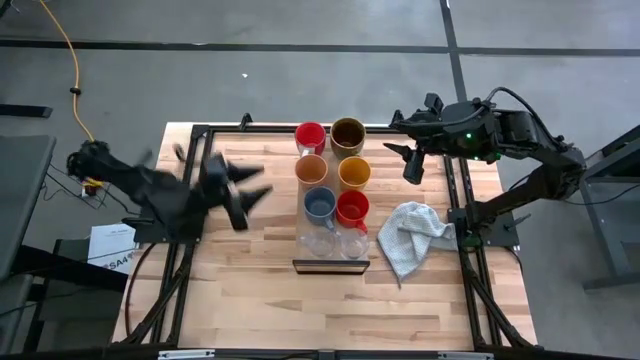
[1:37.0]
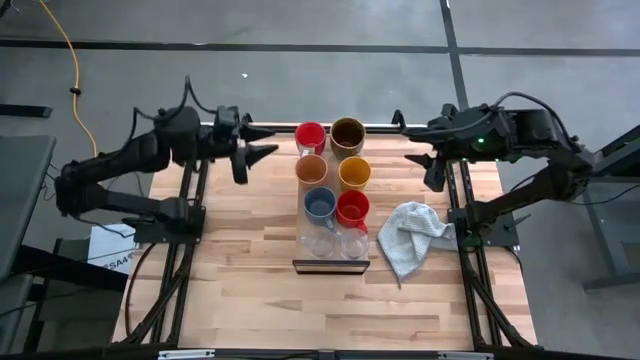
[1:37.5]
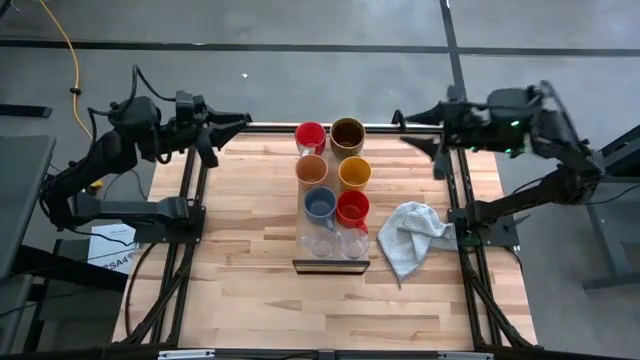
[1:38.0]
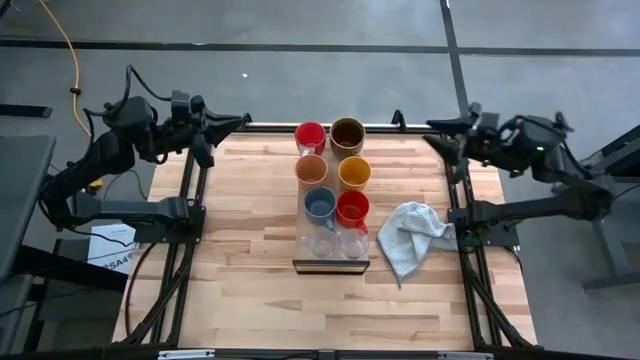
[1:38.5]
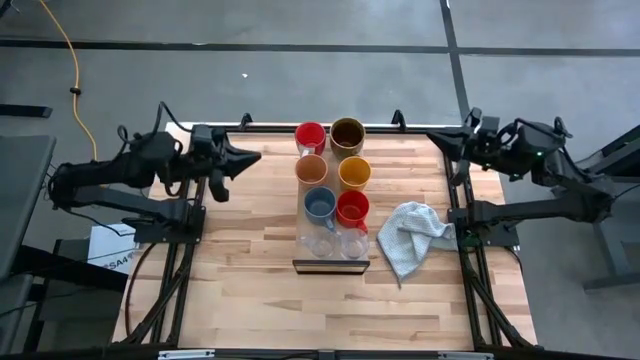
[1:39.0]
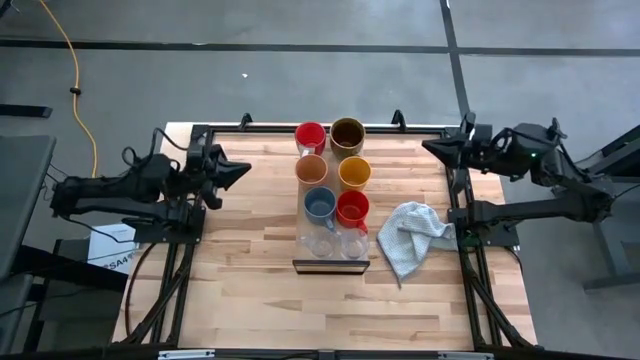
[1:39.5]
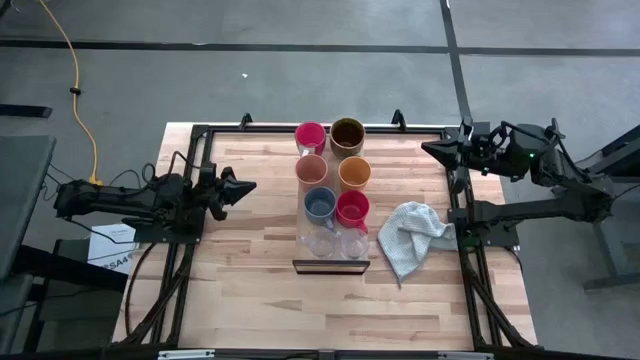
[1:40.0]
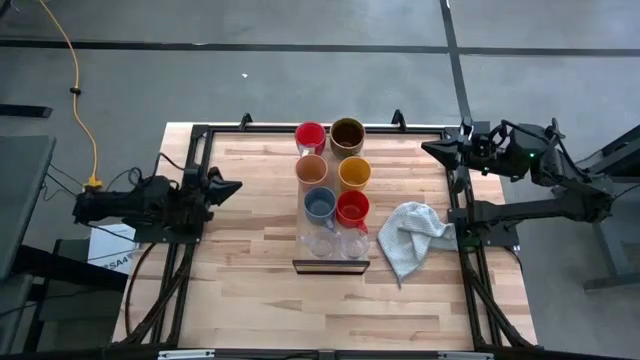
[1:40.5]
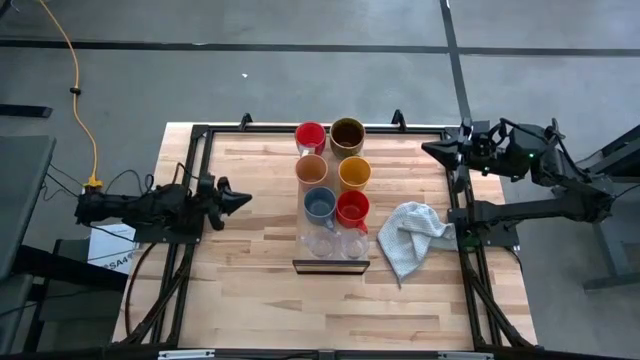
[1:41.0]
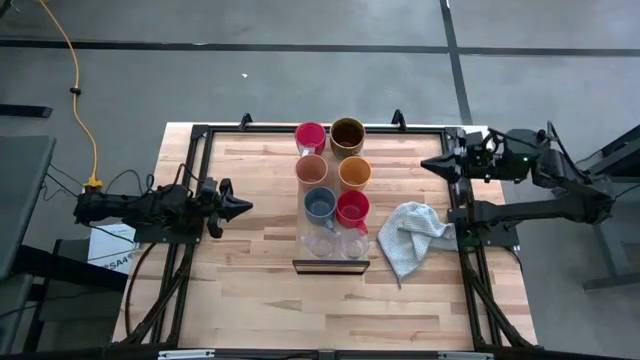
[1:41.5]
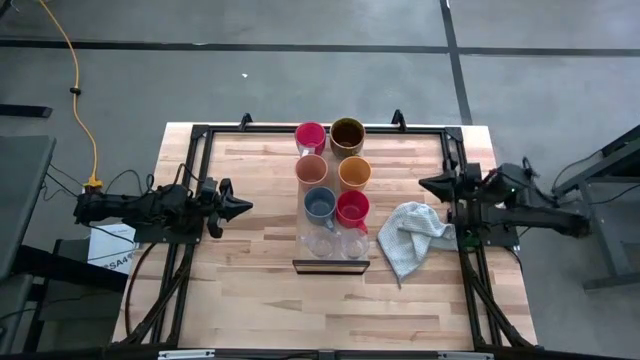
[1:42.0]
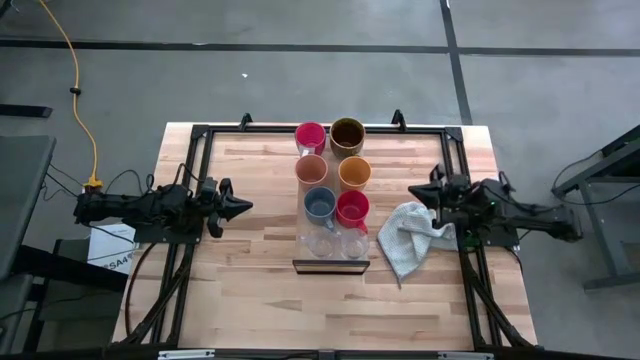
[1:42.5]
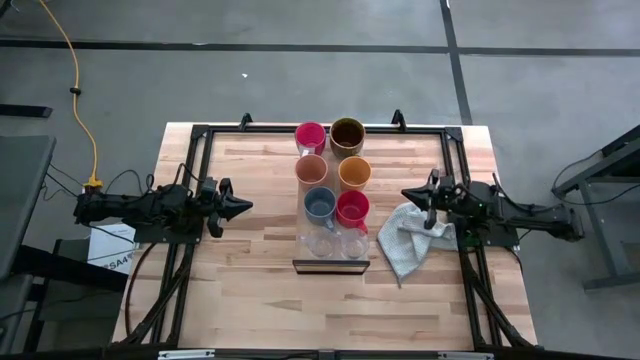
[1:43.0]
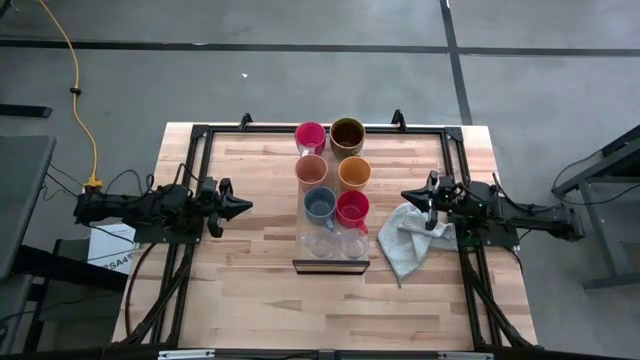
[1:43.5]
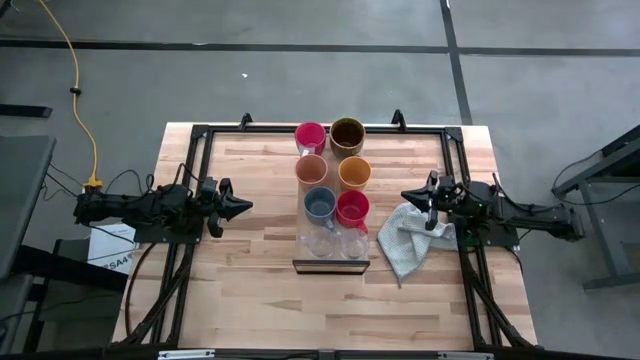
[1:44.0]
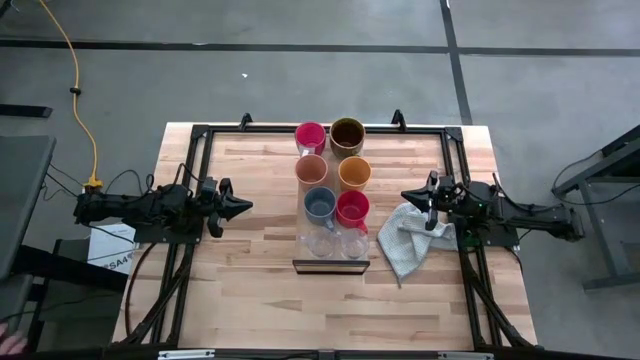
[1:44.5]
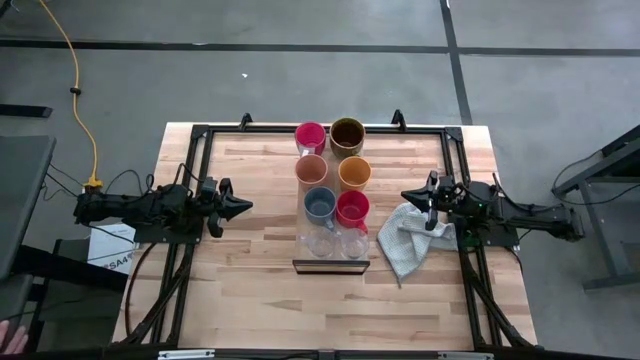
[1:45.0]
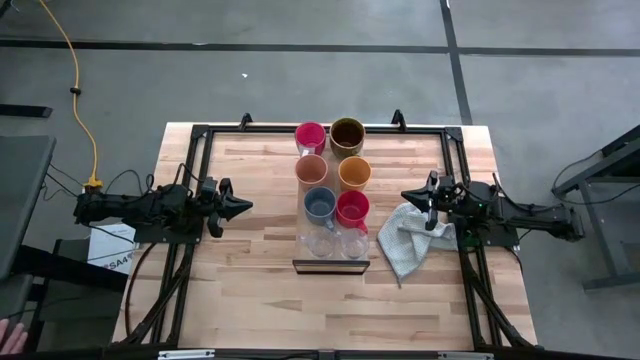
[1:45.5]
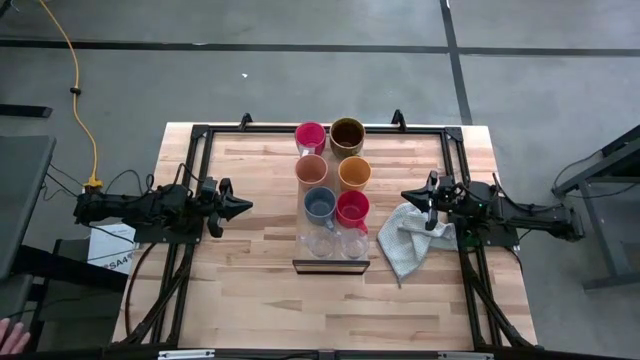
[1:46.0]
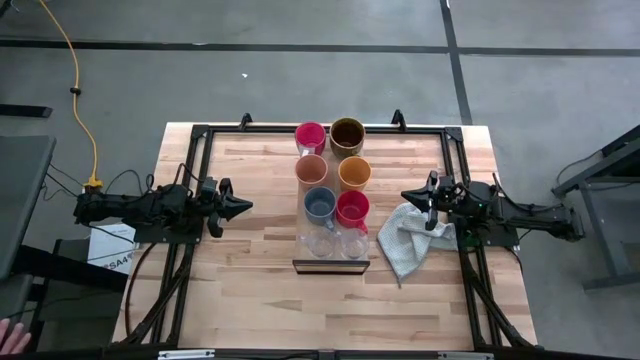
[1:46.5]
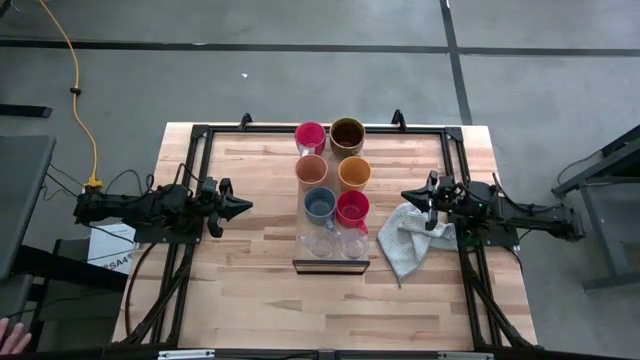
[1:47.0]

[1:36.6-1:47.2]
Task: Stack small to large cups/mugs on shelf
Return to Home Position

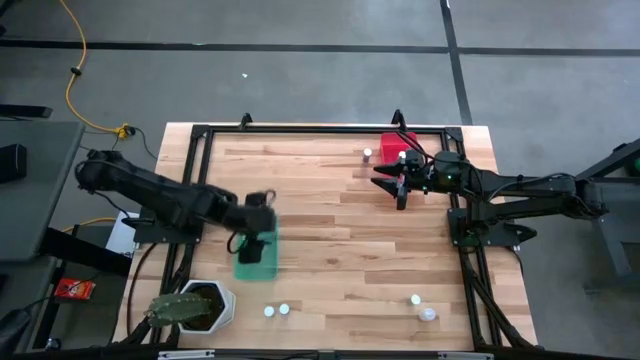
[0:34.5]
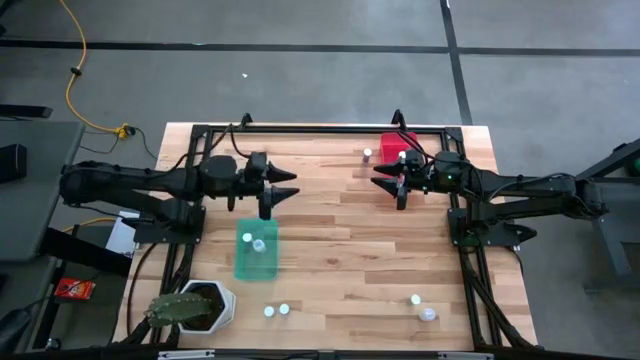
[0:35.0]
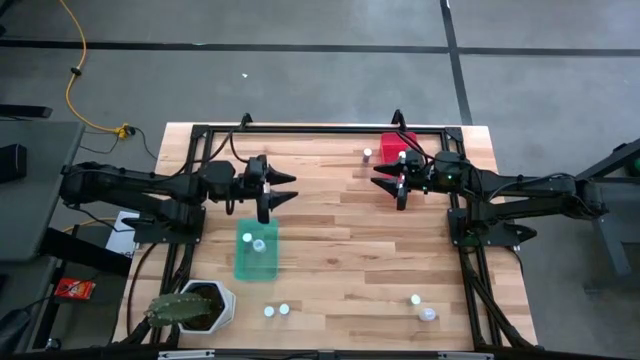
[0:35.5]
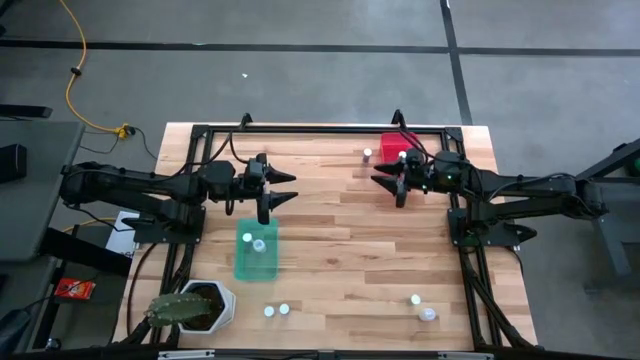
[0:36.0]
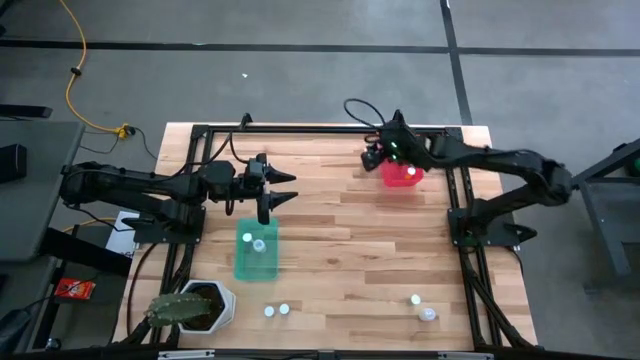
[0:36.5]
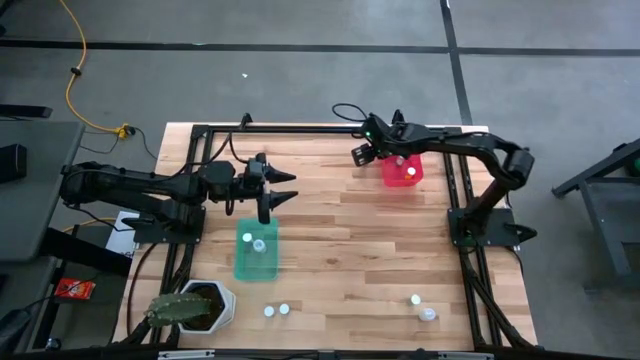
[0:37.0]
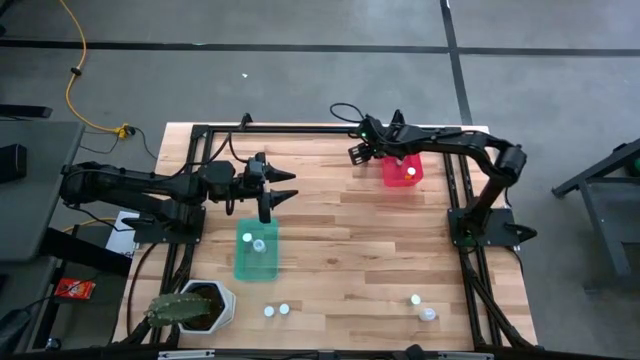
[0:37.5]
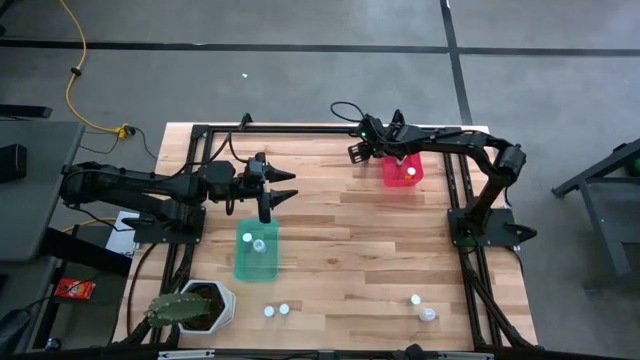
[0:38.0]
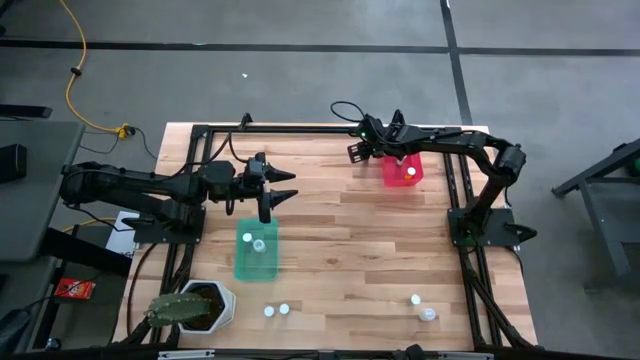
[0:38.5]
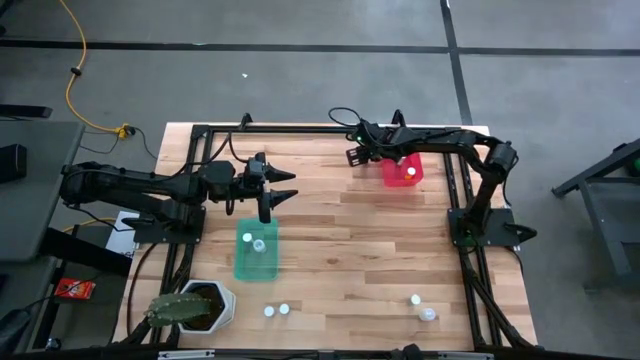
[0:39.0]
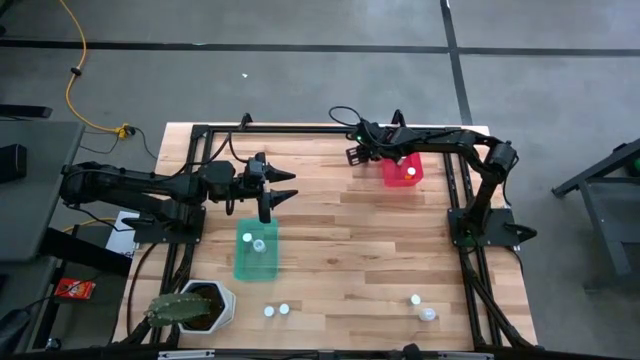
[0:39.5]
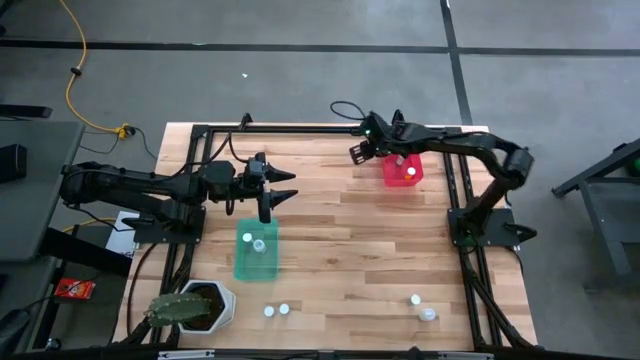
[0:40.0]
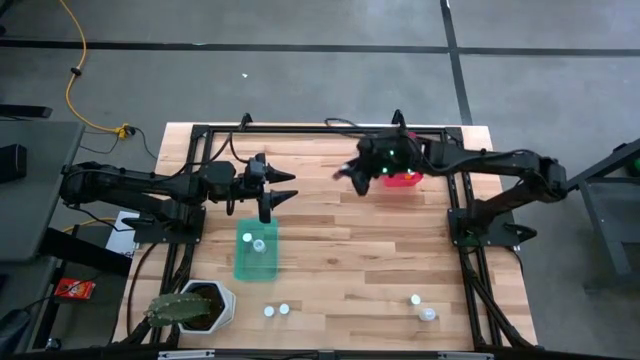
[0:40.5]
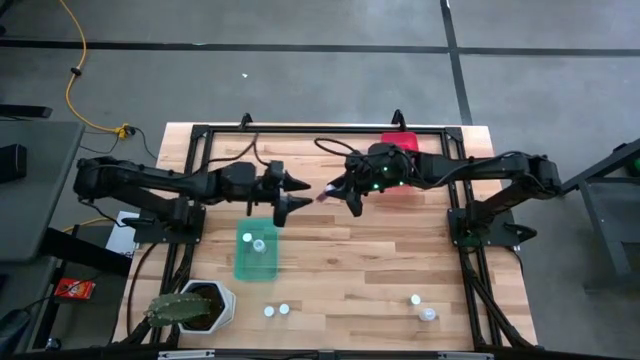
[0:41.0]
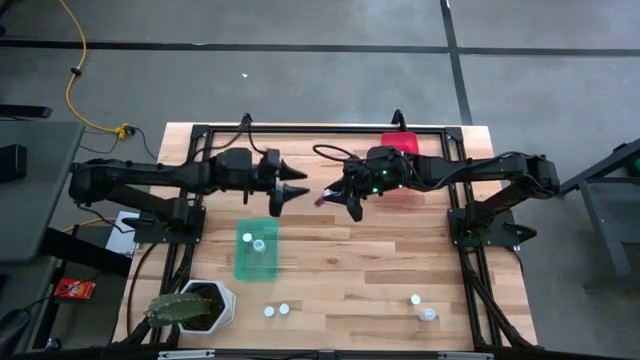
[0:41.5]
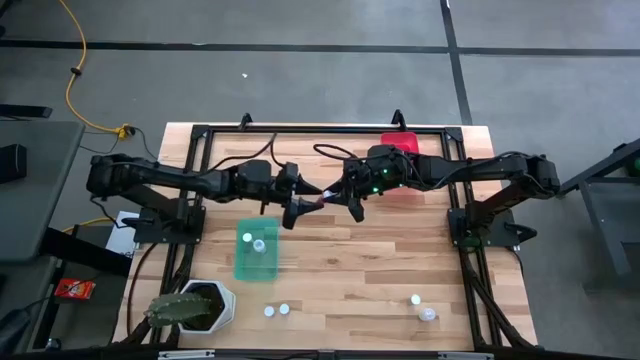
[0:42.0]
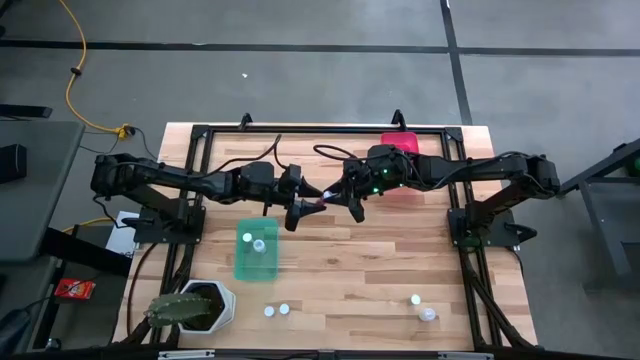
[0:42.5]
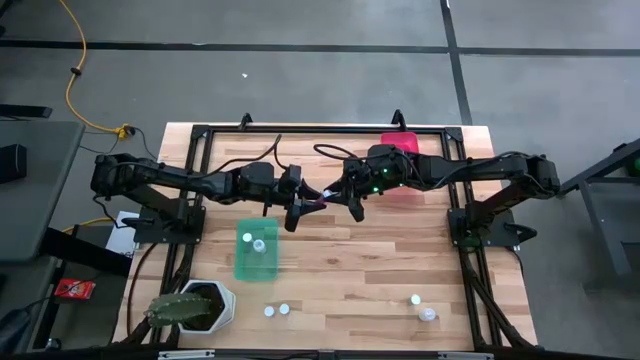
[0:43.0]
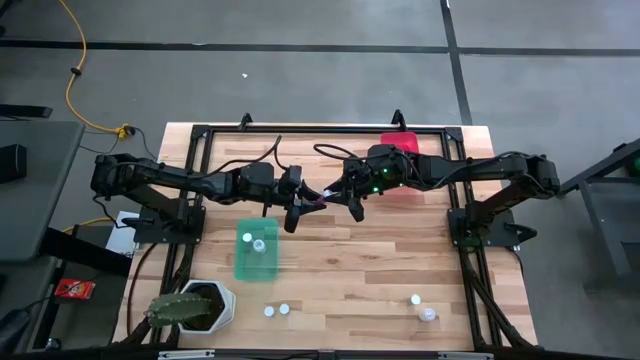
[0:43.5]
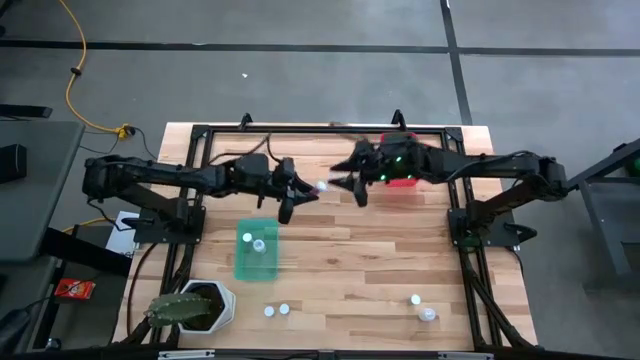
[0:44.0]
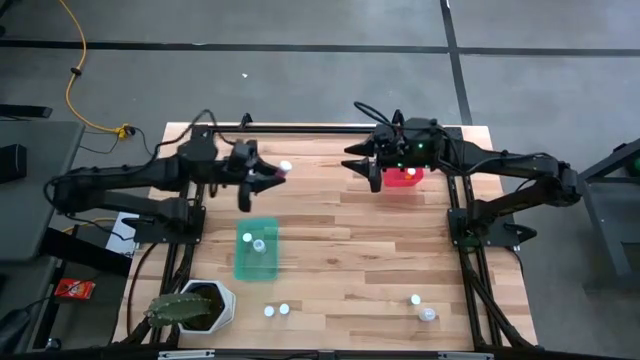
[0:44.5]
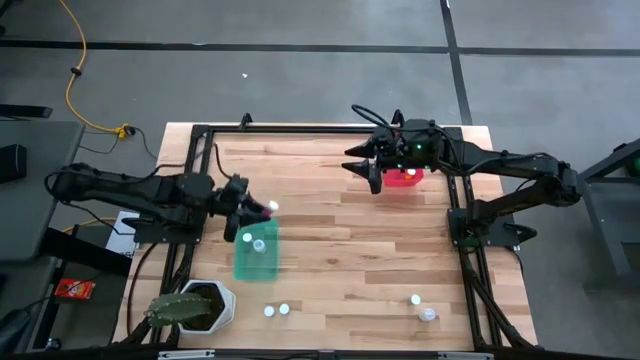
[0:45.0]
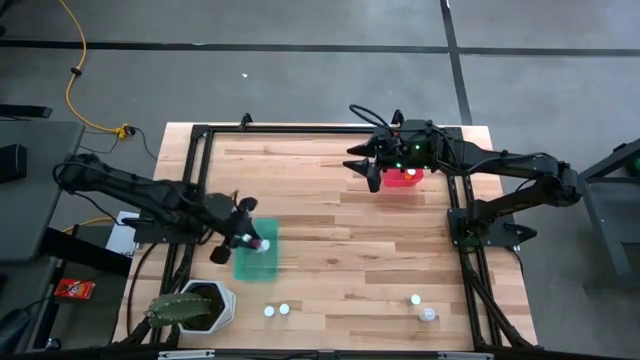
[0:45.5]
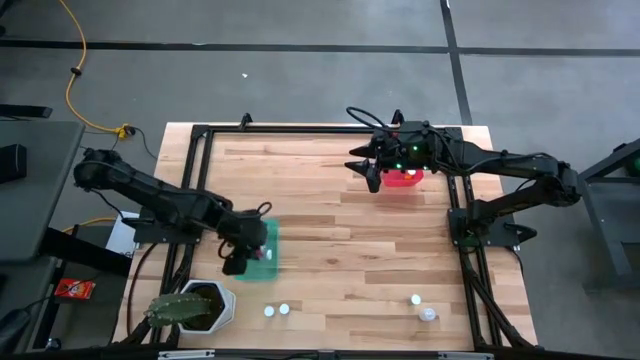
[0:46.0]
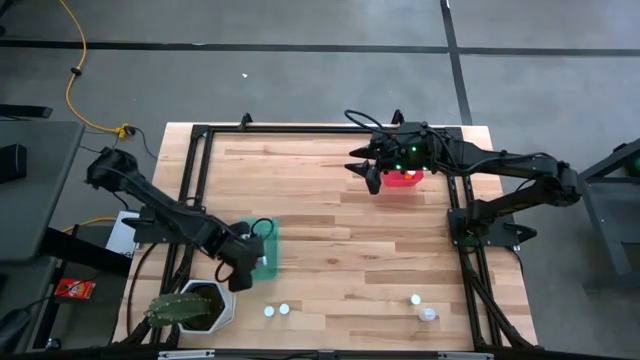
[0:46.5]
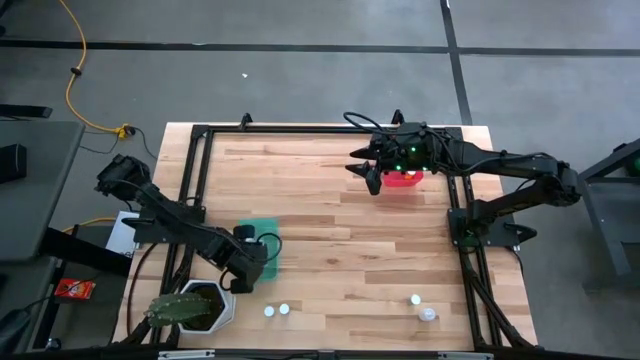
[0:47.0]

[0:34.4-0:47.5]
Task: Pick and place medicine bottles into bin by pill shape (circle, oval)
Put the blue capsule bottle into the blue bin
